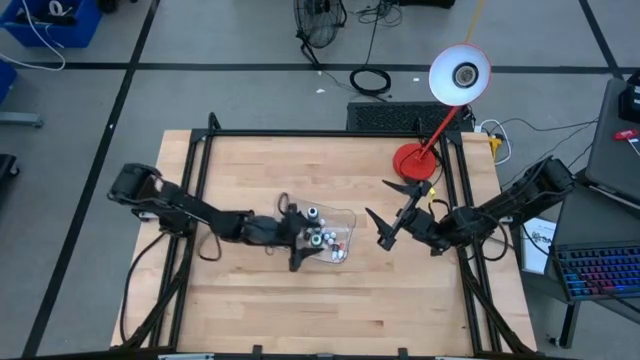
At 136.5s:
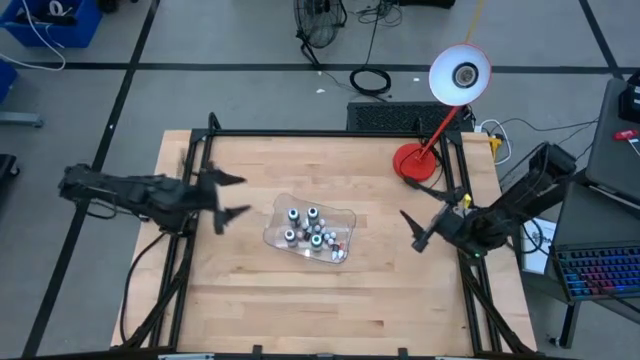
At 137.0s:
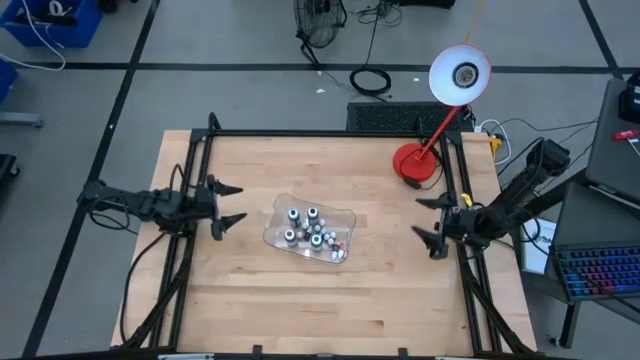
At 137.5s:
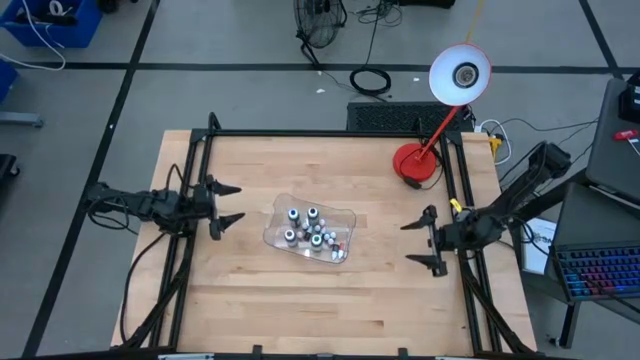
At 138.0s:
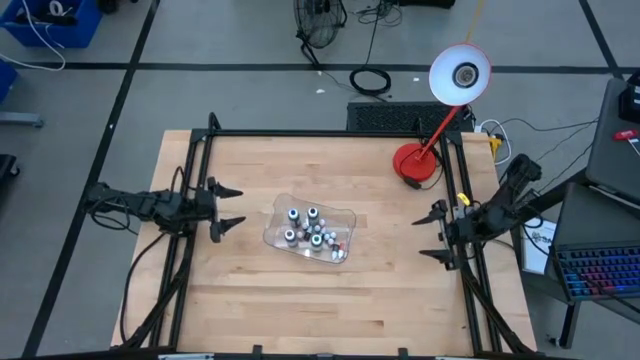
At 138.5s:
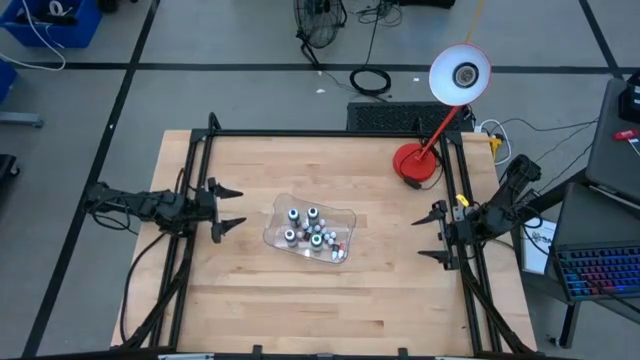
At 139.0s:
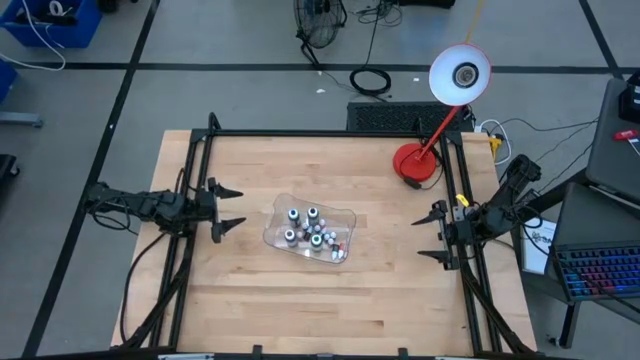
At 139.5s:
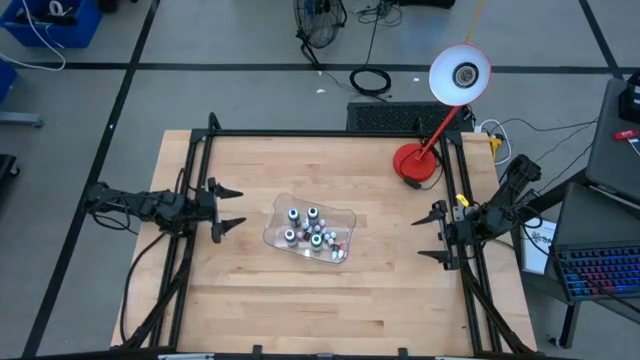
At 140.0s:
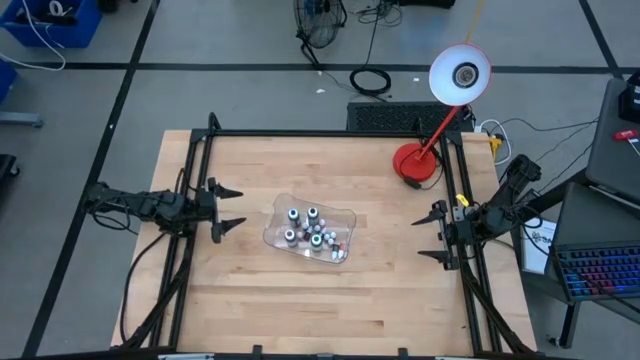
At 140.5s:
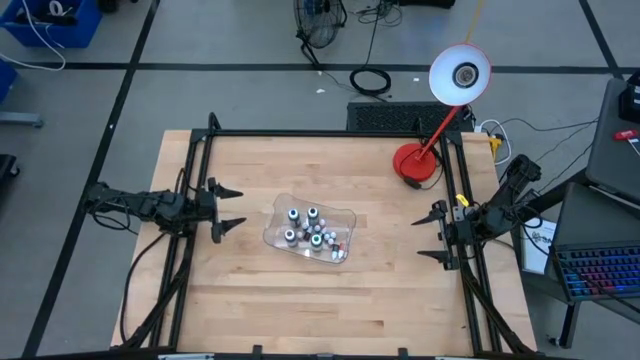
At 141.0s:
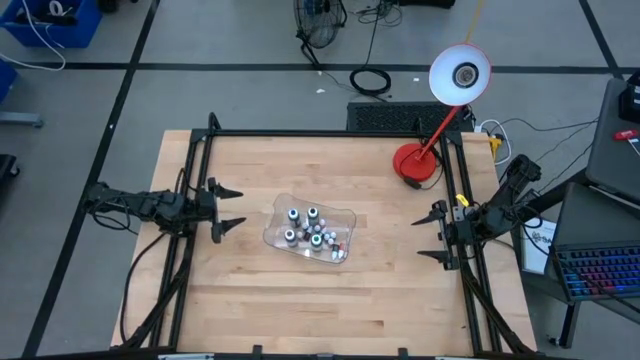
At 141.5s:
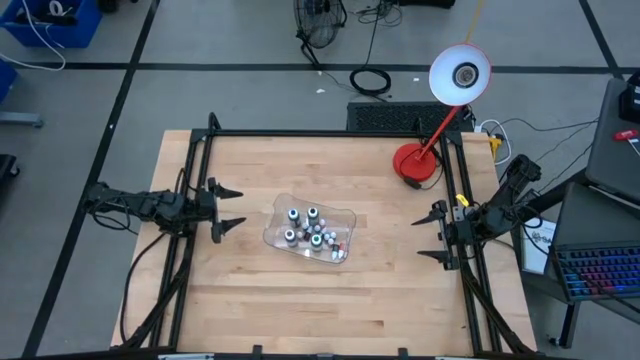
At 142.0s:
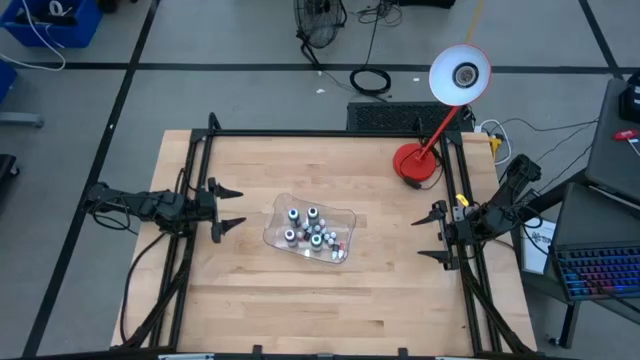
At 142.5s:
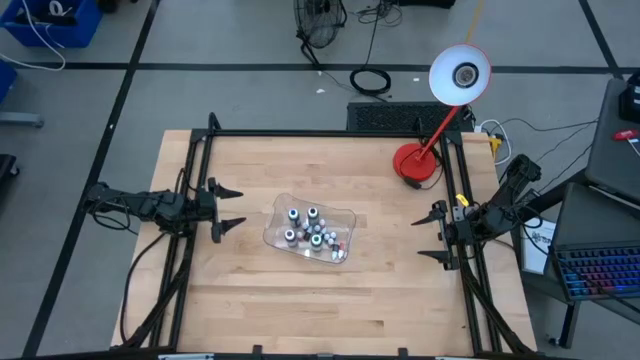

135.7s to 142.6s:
Task: Pick & Place food coloring
Return to Home Position

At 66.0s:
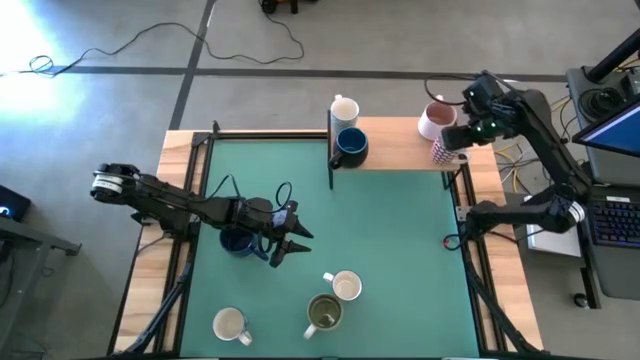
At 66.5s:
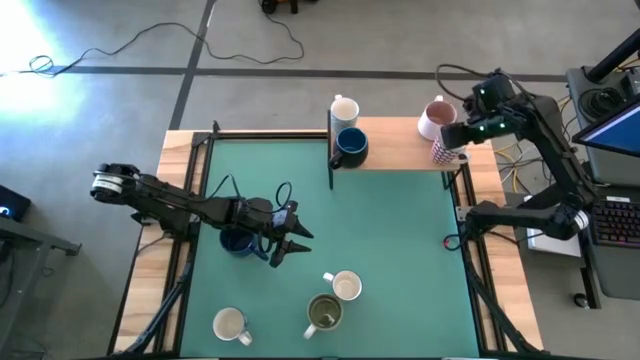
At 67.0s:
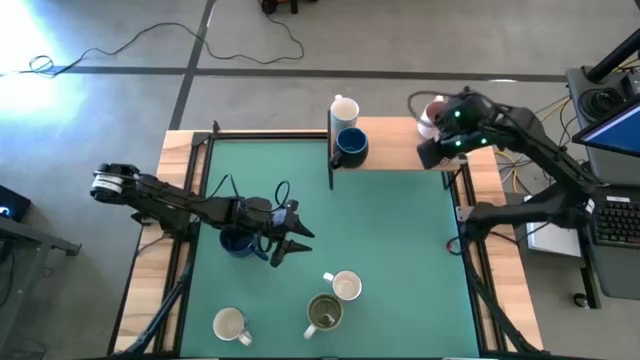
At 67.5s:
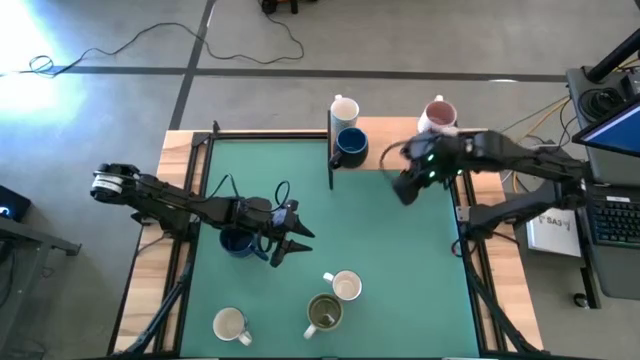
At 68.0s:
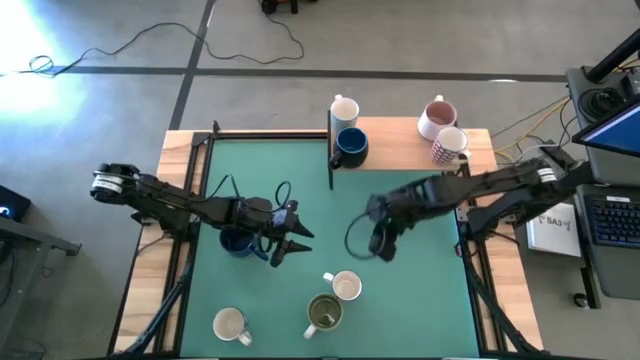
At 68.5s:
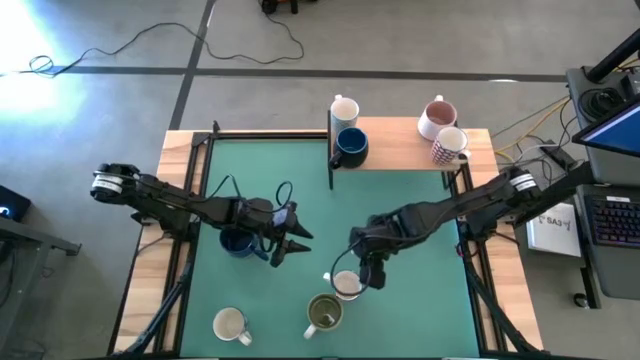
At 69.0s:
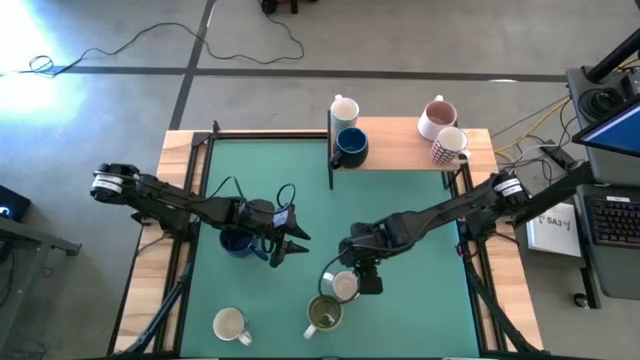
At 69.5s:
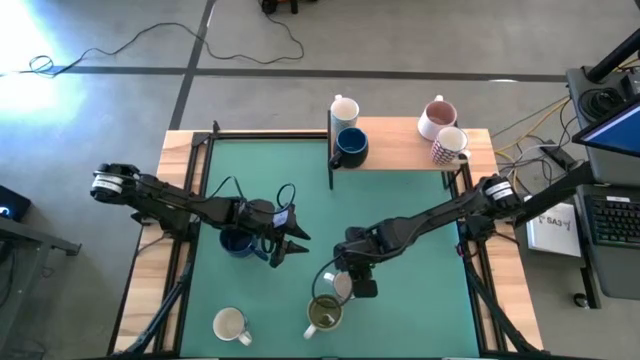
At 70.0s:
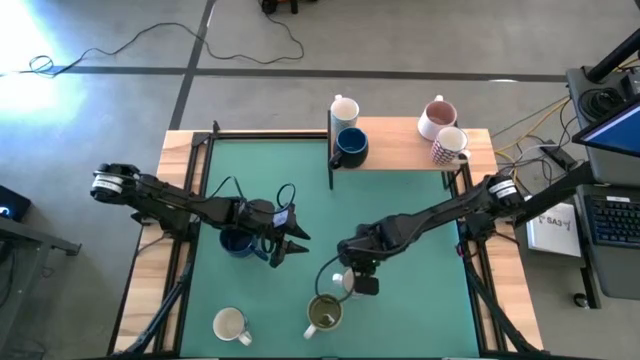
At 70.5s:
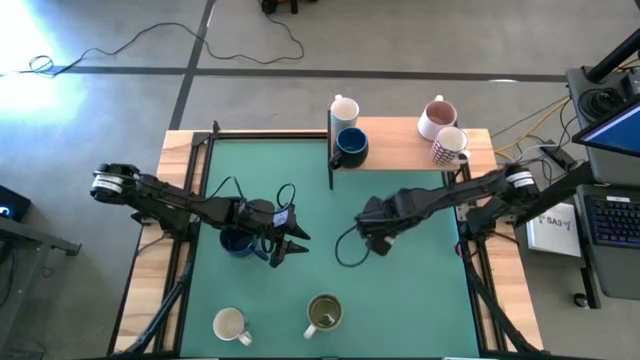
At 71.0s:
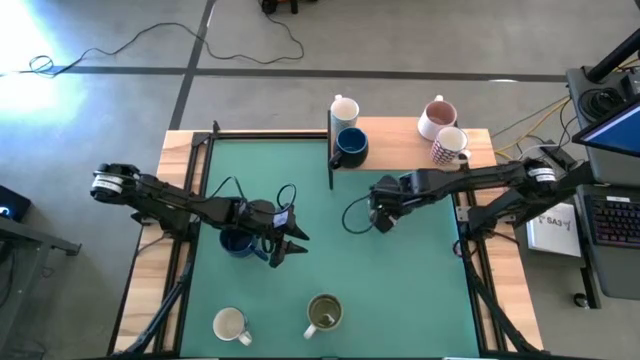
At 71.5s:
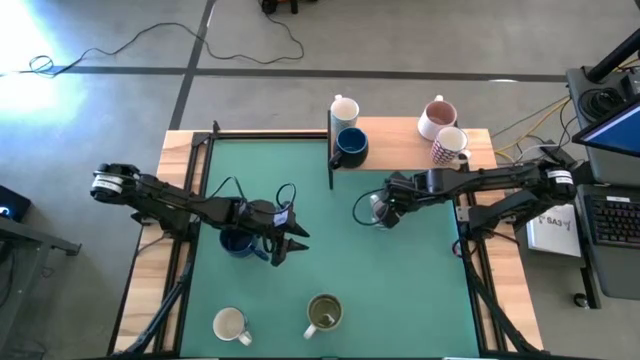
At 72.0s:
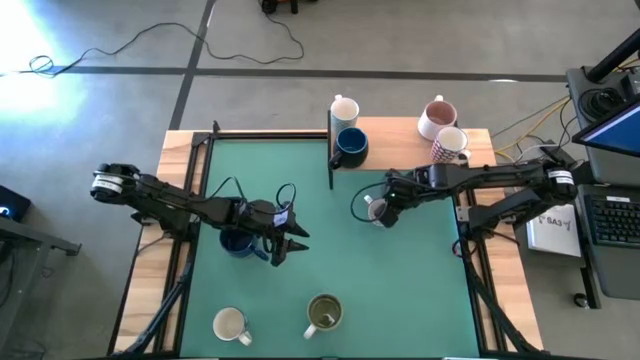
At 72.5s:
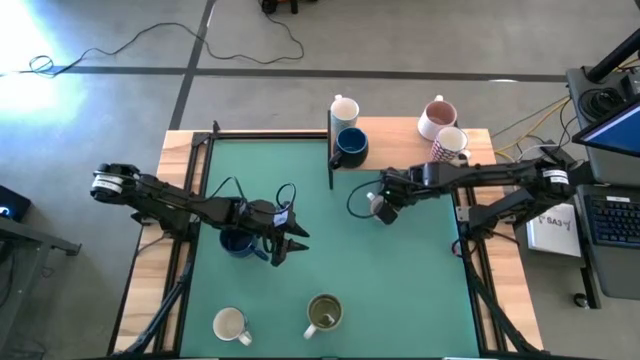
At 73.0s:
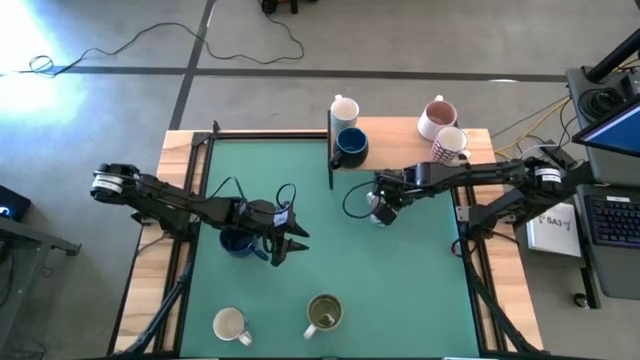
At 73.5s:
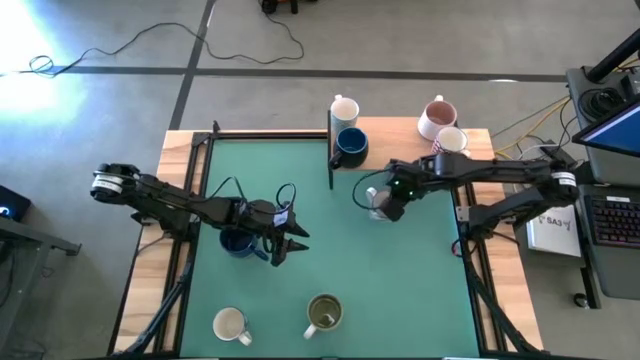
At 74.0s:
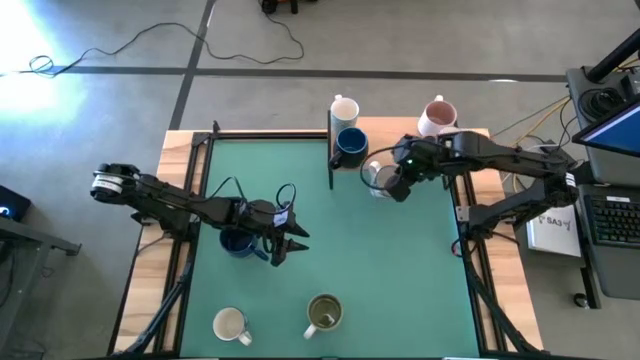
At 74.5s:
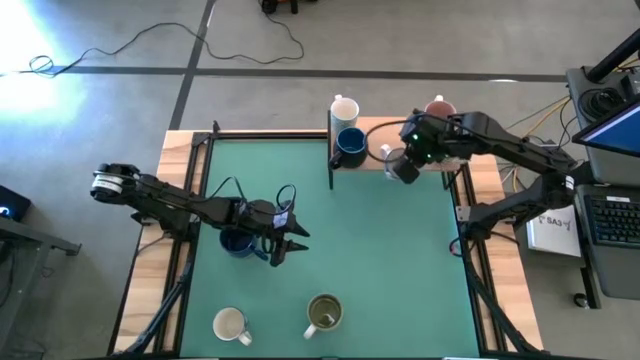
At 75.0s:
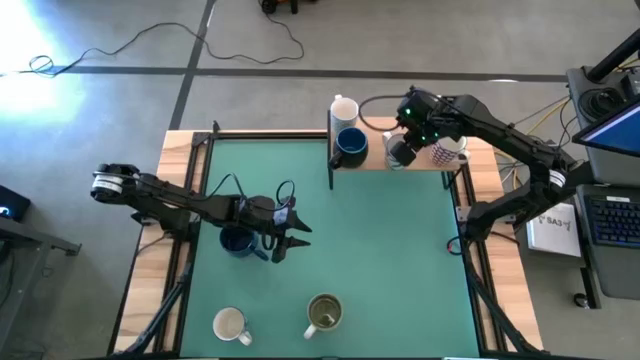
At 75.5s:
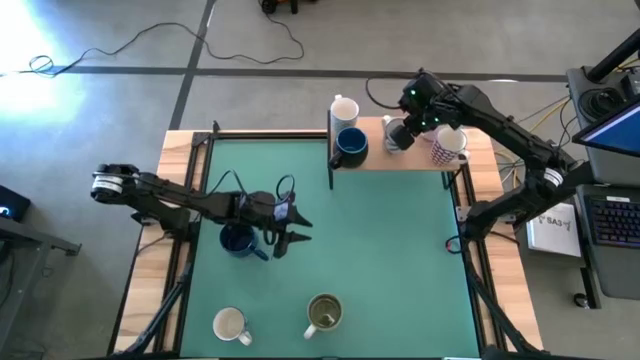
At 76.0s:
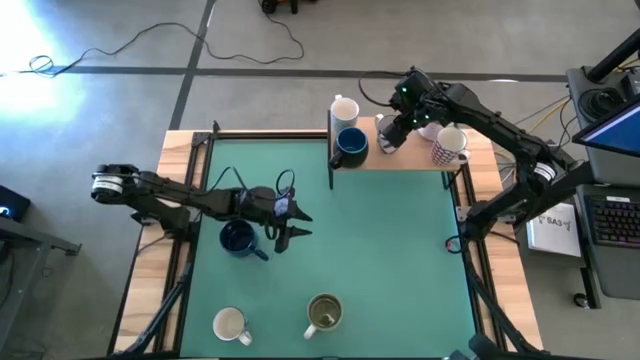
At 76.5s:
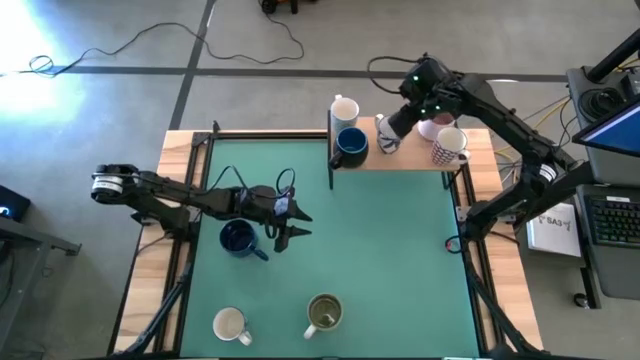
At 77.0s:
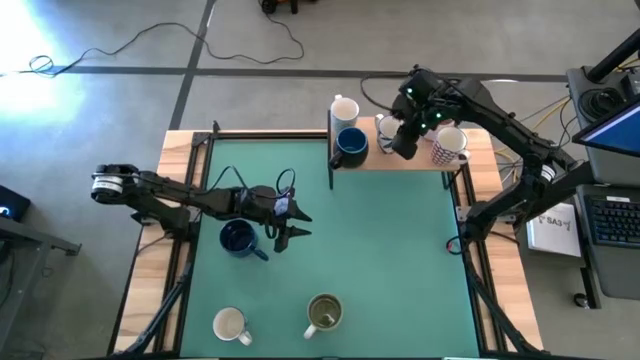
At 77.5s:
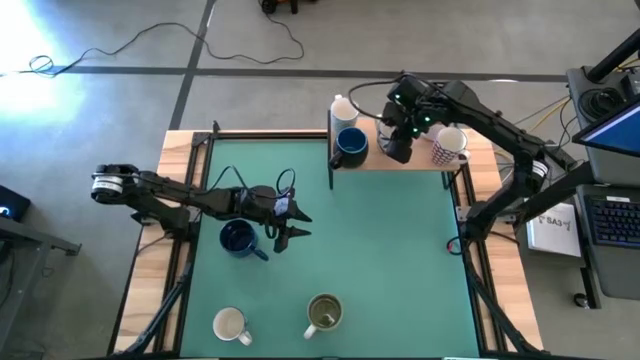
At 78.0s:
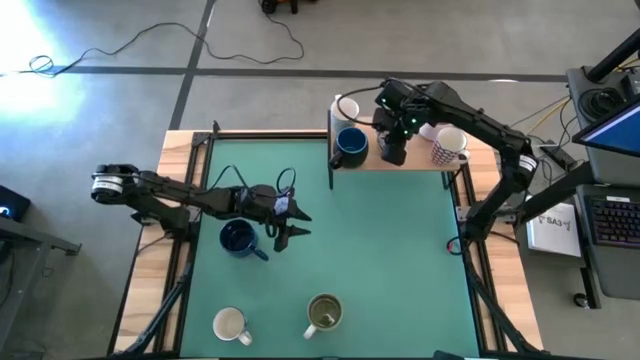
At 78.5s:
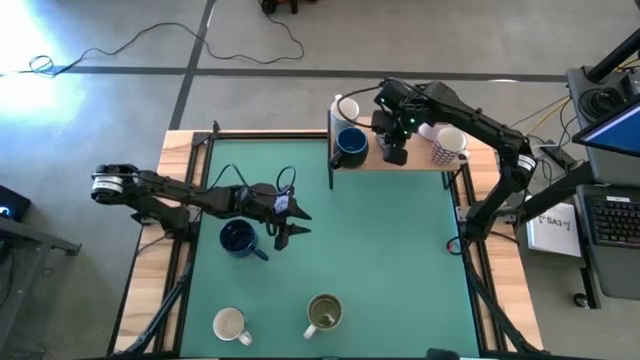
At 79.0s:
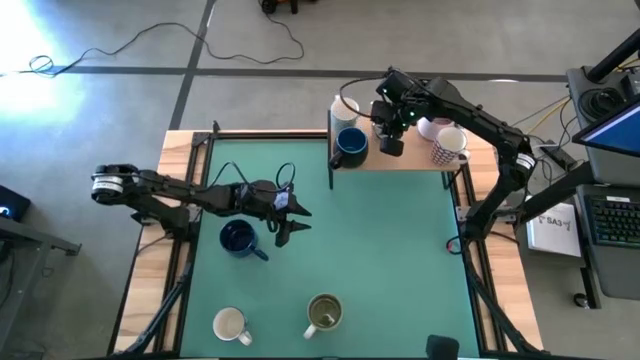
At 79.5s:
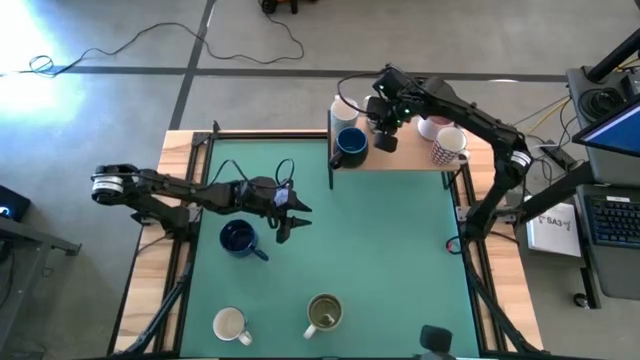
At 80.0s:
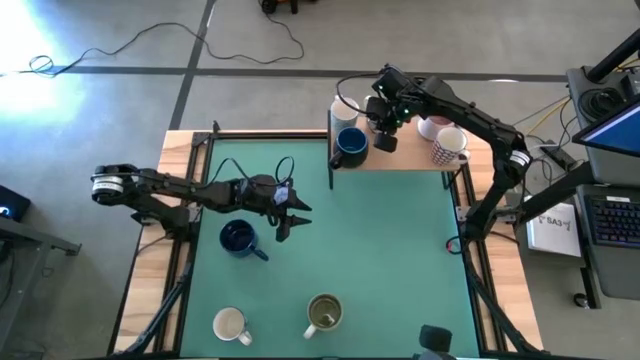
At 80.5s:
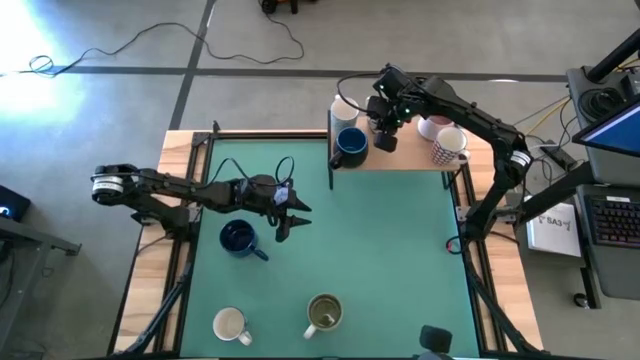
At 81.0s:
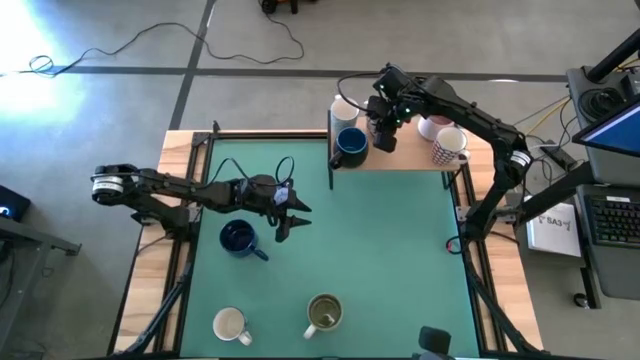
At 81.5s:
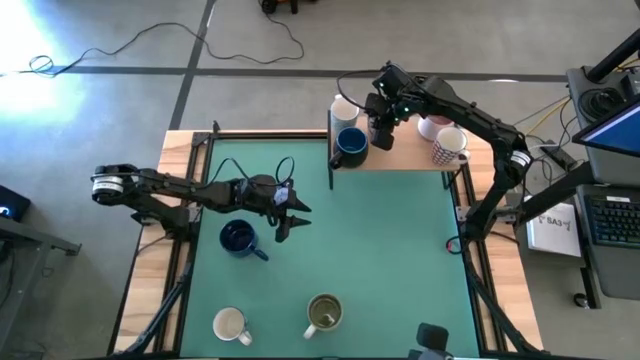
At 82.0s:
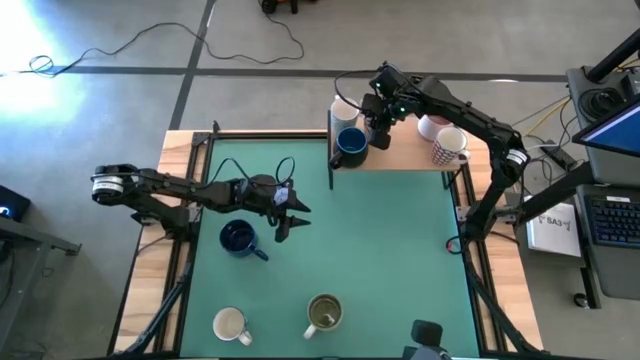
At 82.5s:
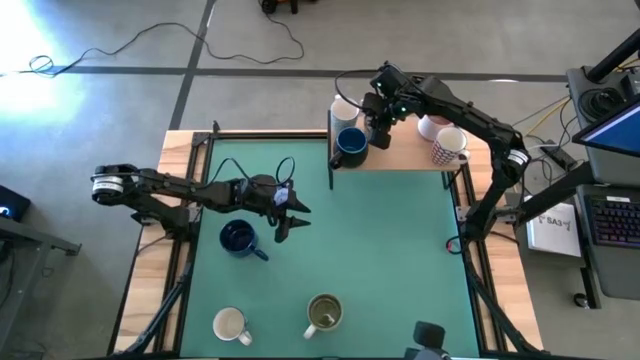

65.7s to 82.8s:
Task: Place coffee mugs
Put the right blue patterned mug on the shelf
